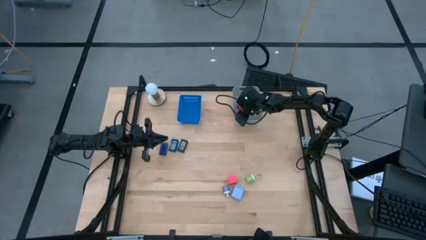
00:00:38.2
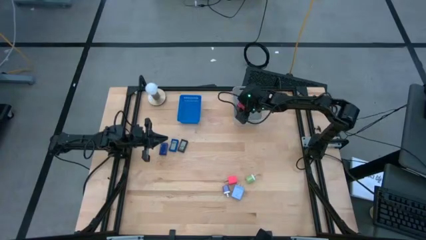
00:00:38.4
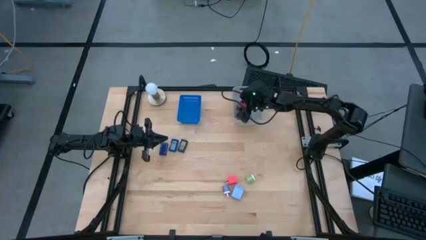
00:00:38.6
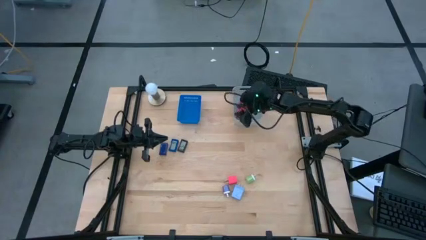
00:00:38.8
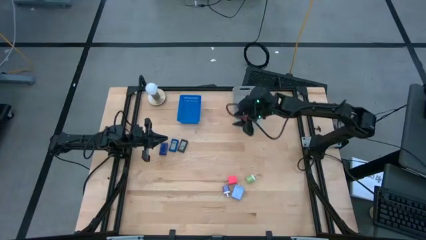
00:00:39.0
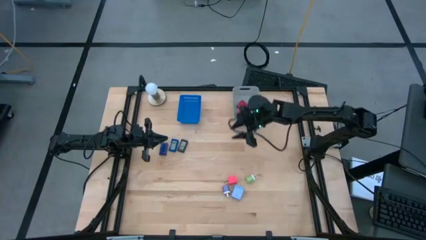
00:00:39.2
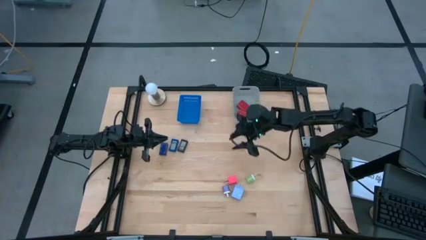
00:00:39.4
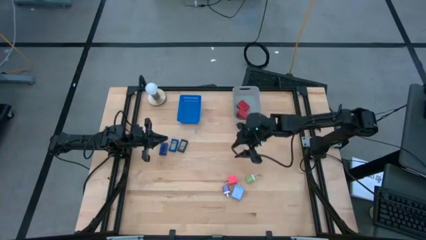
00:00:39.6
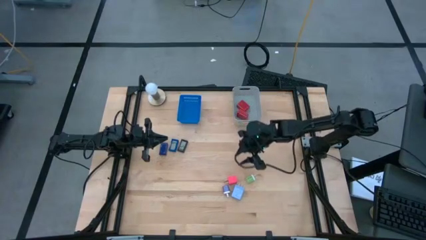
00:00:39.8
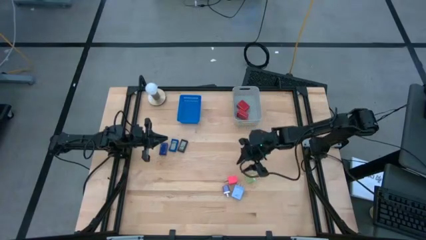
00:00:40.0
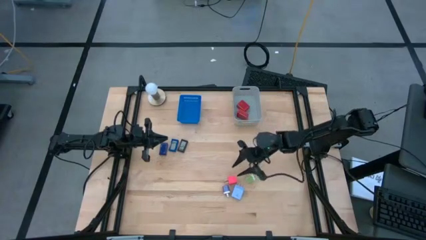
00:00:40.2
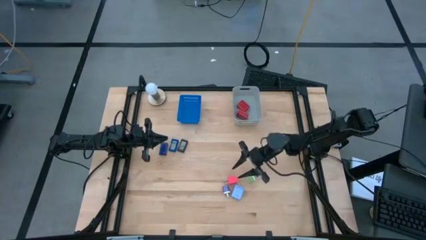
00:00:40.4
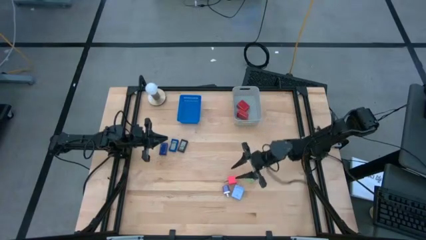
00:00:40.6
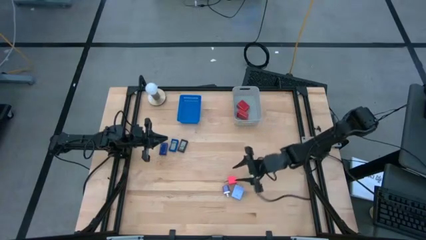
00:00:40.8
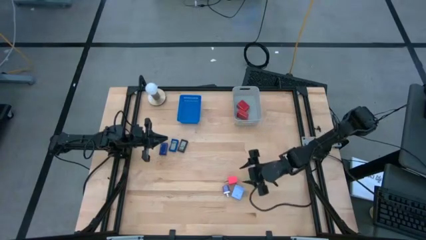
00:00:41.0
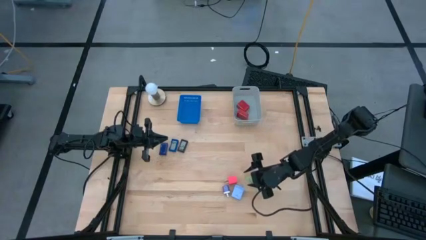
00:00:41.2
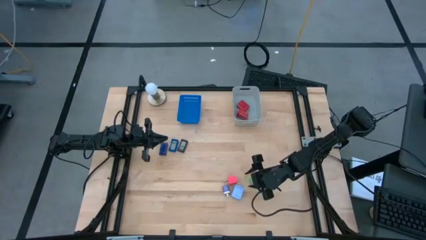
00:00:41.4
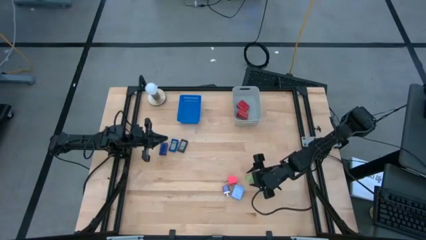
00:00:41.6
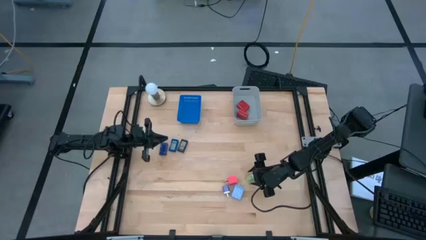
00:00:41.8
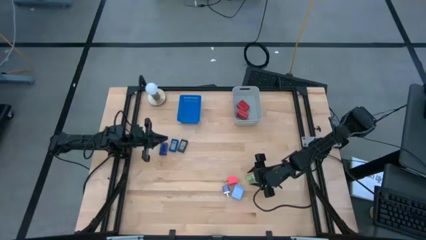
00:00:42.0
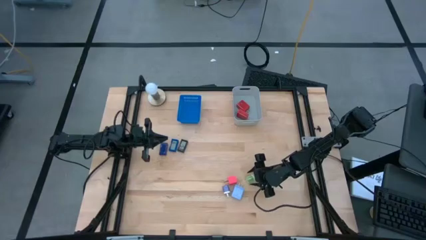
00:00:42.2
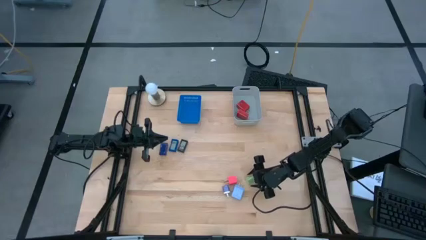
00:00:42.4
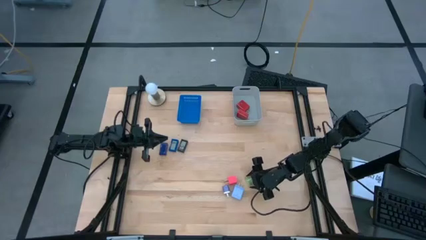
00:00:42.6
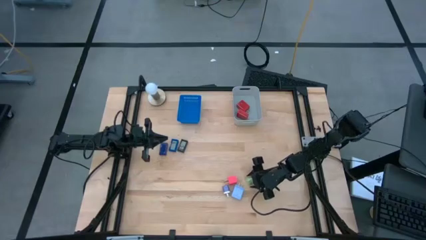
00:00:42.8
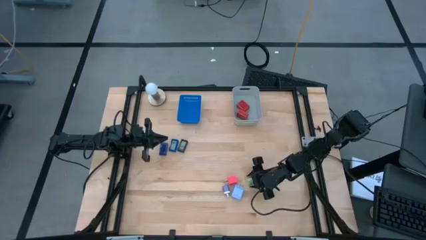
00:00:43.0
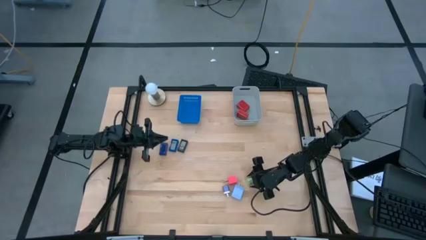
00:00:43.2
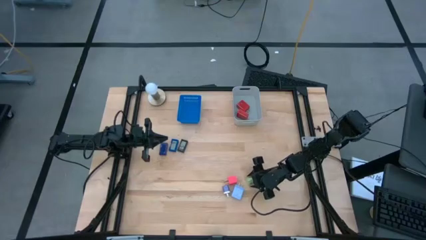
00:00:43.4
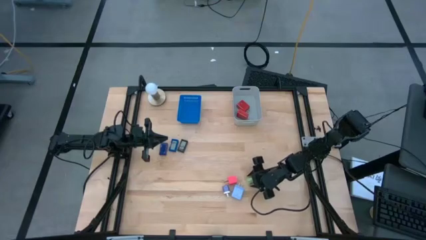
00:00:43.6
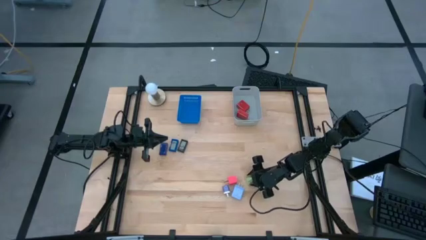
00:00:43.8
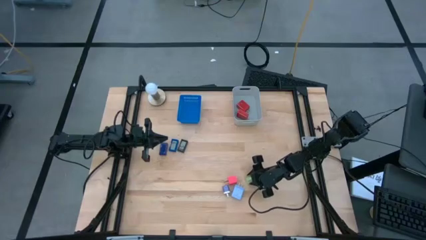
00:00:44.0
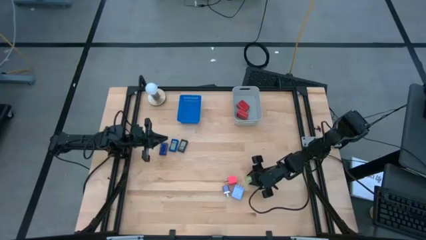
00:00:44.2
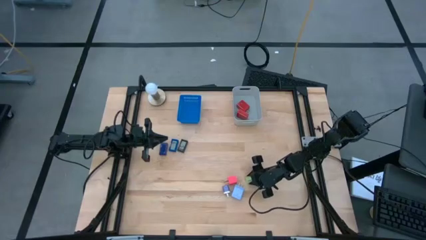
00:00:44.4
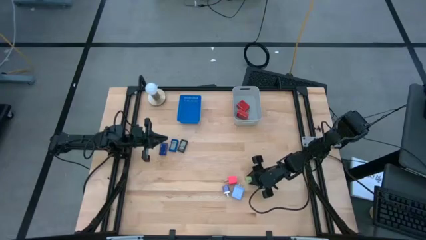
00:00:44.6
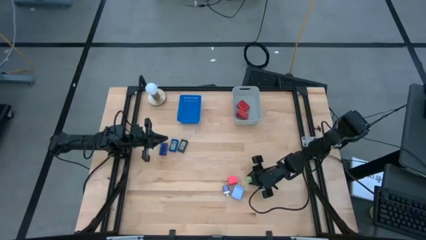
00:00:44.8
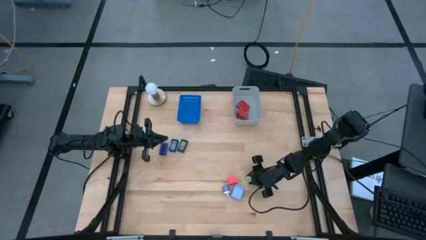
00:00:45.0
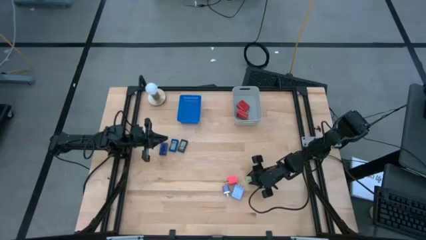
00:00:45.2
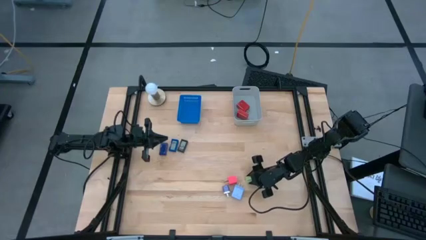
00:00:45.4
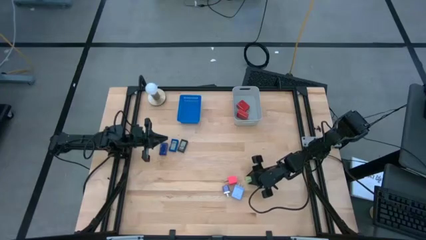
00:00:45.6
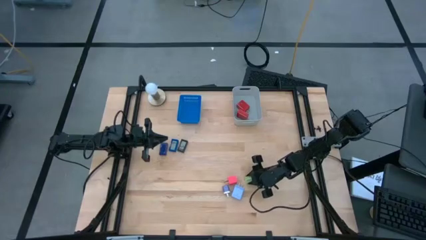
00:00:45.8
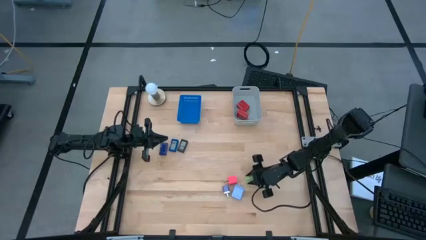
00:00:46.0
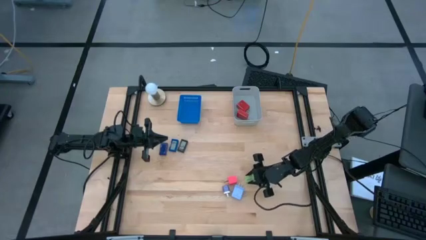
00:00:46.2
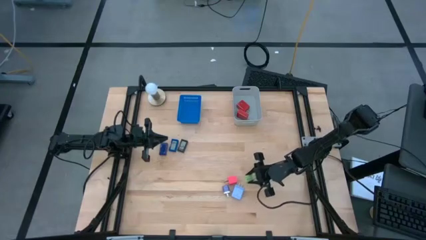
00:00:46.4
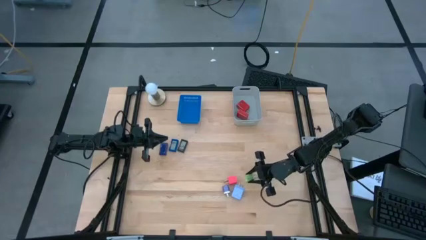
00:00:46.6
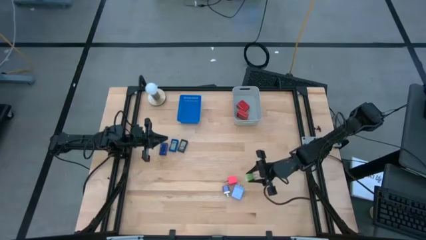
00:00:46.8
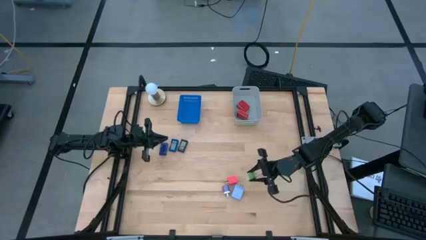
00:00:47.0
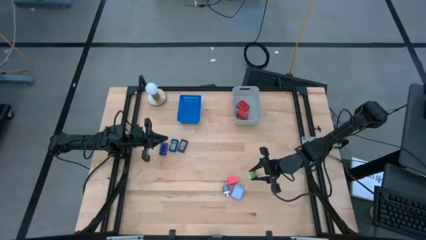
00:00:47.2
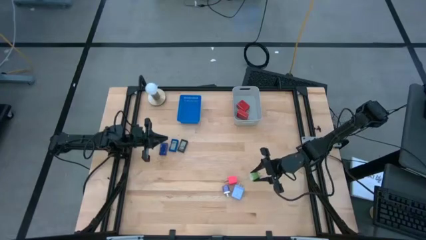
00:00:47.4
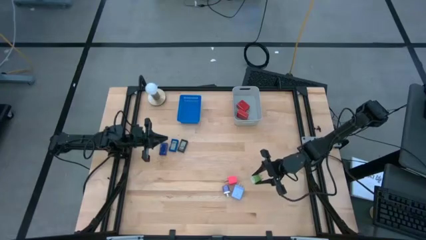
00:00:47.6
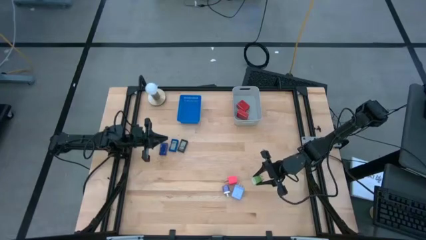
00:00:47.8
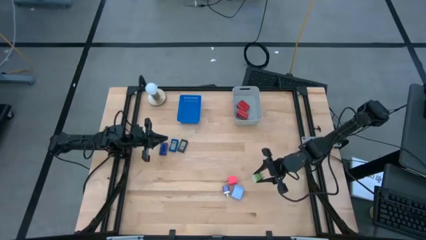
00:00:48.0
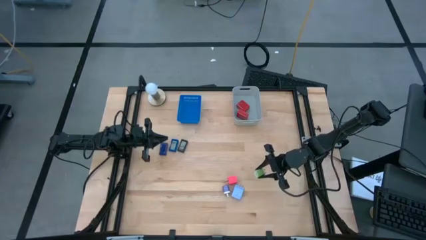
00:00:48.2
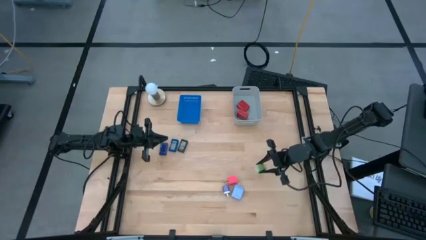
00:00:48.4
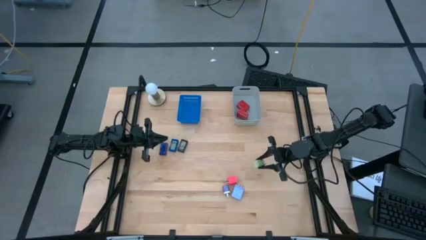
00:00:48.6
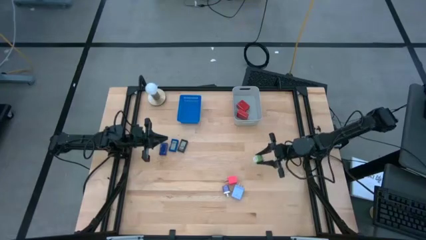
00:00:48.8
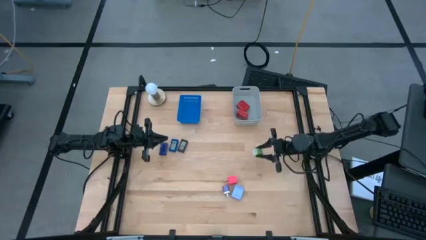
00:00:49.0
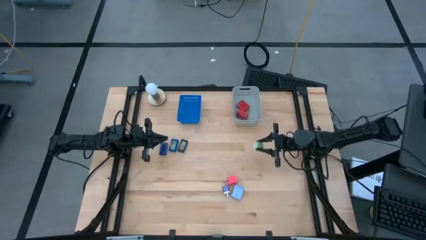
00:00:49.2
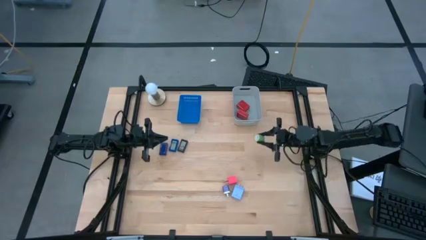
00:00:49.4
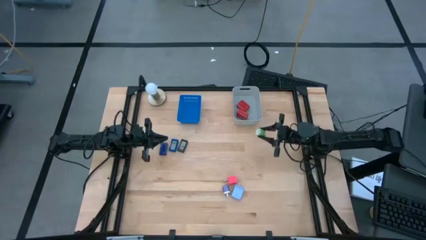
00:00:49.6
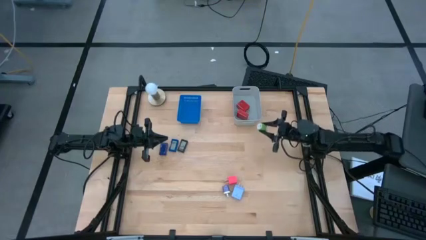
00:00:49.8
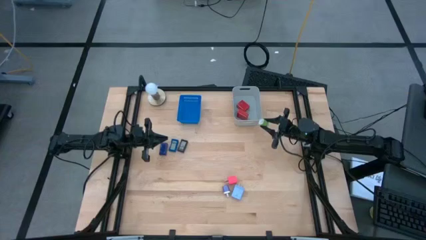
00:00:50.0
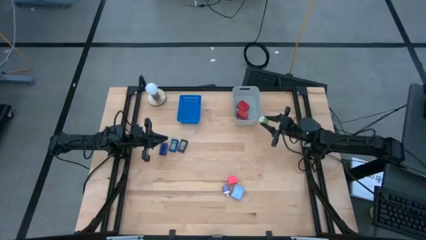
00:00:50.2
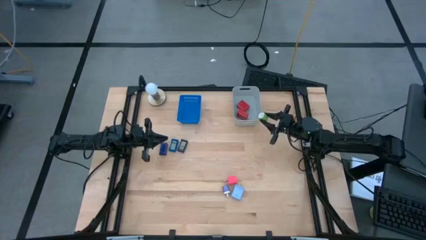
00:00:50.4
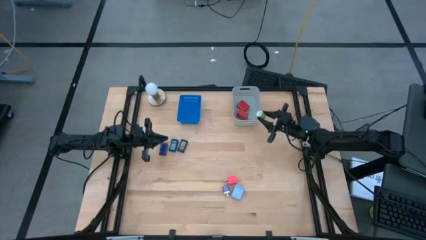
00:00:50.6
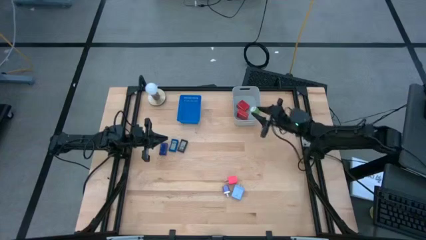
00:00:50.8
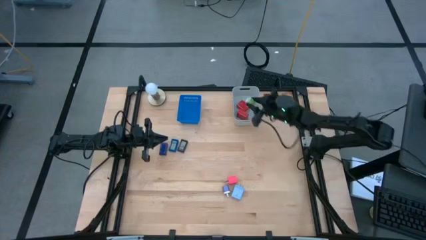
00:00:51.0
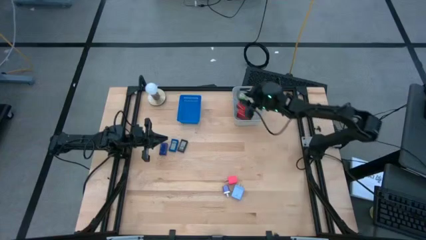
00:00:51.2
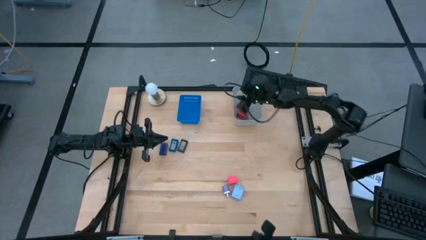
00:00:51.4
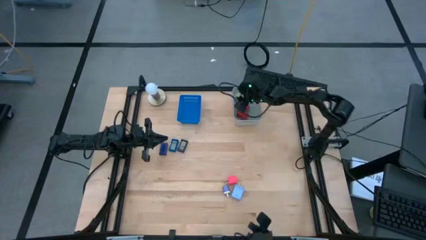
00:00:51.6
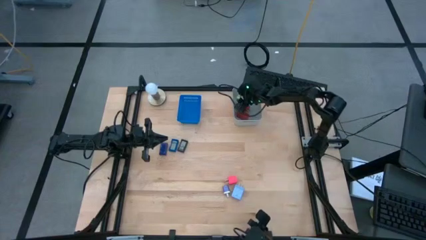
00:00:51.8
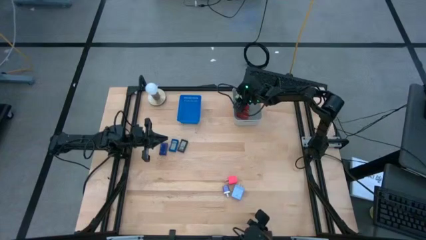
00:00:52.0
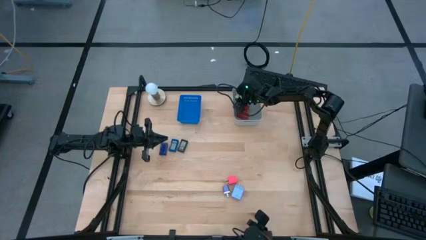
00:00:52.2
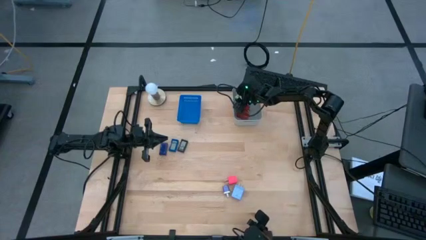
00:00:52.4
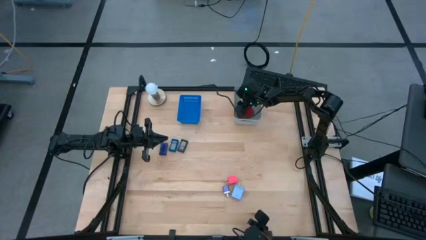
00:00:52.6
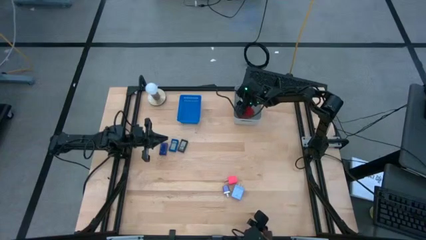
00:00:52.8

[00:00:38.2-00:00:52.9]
Task: Pick & Place Office items
Put the green charger adapter into the gray bin
